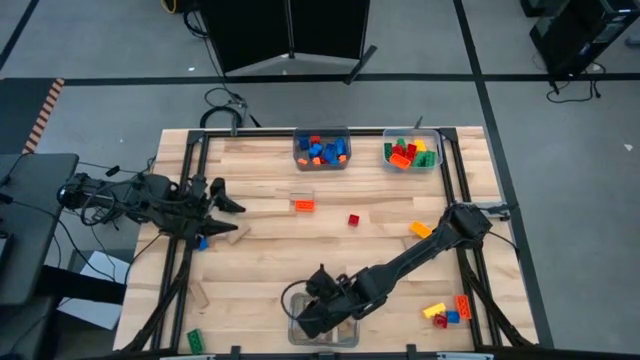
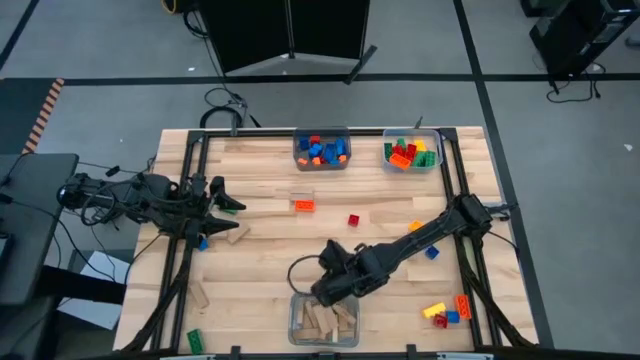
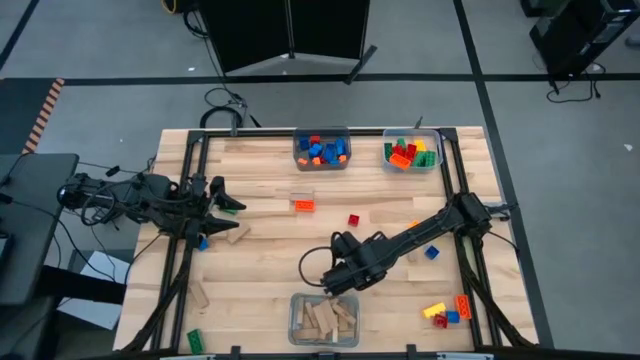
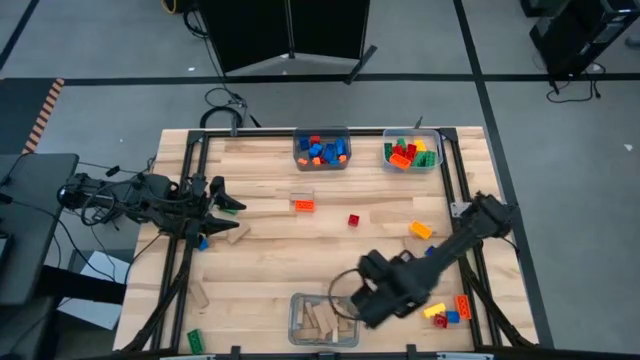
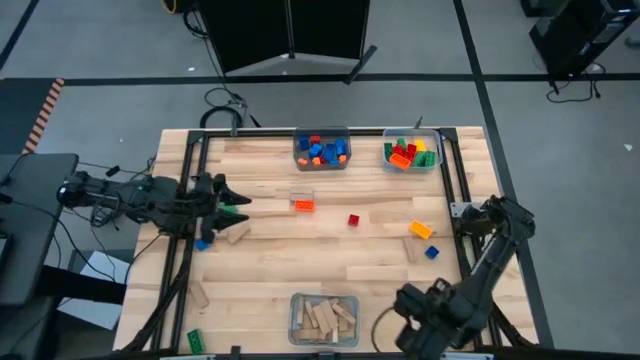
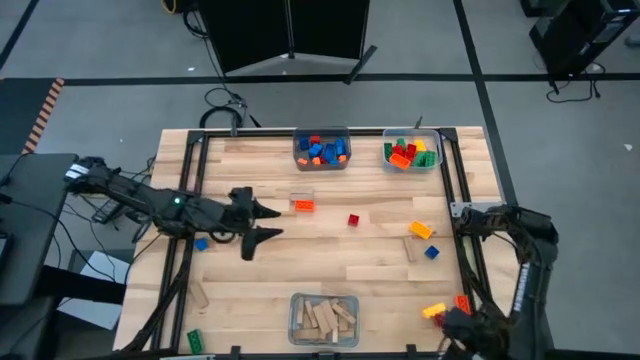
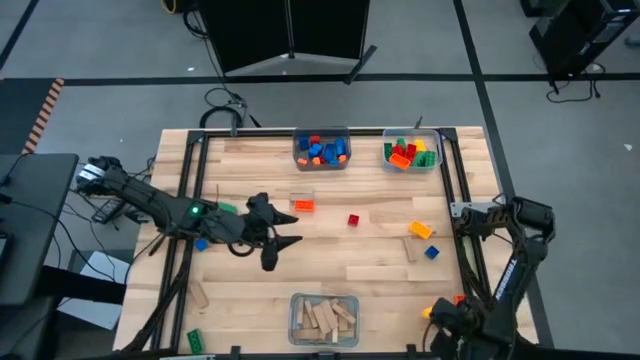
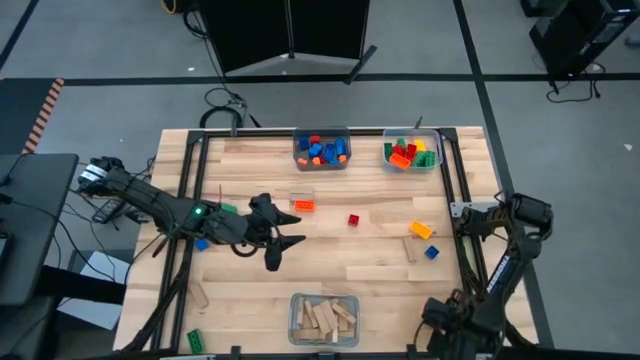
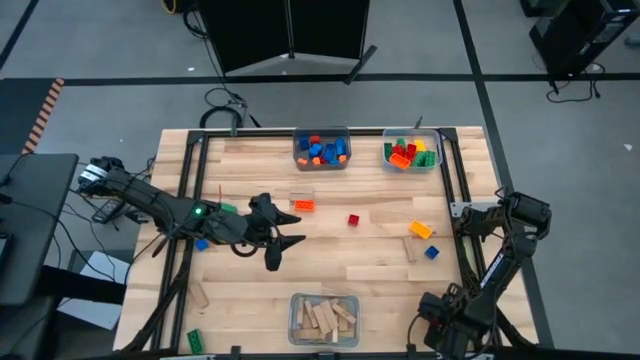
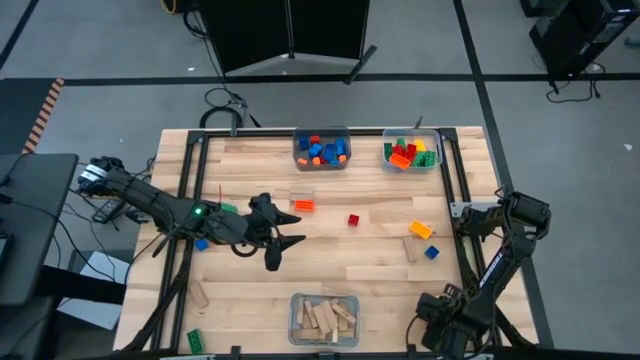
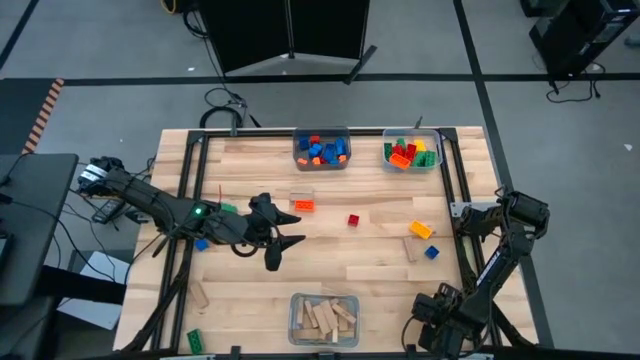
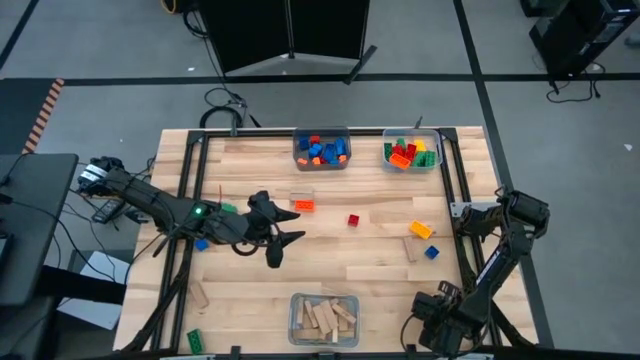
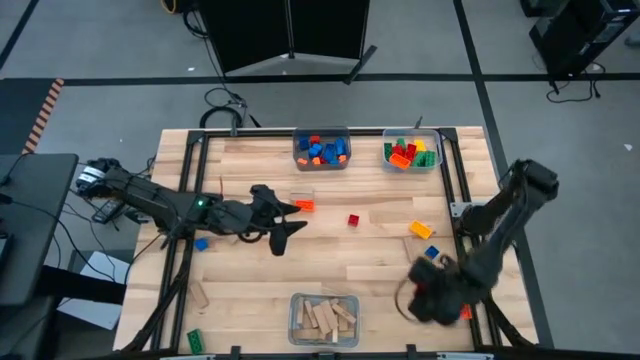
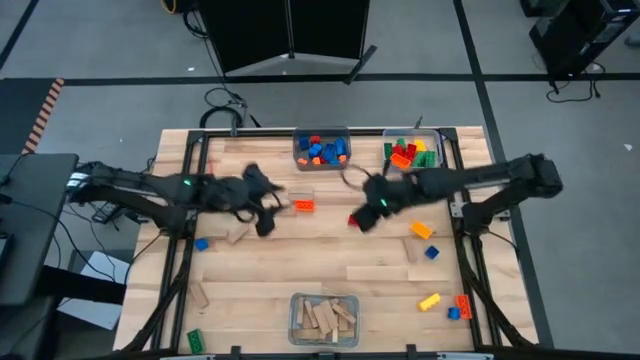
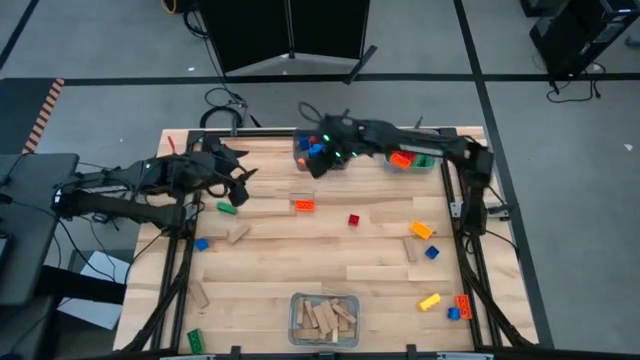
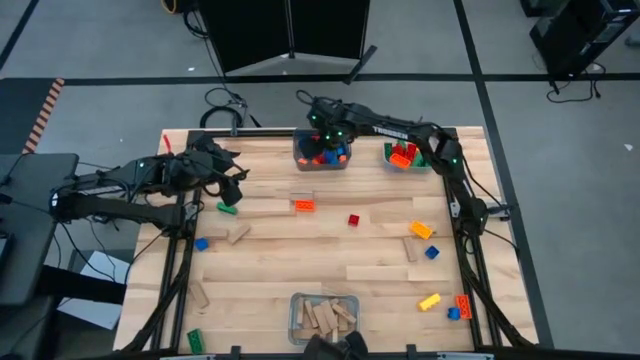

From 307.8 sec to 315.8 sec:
Task: Sort blocks by size
Put the small red game piece into the black bin

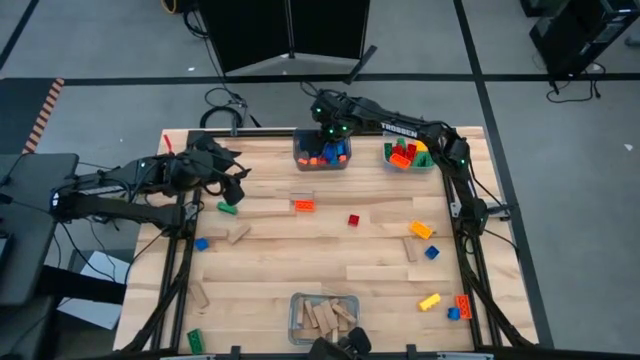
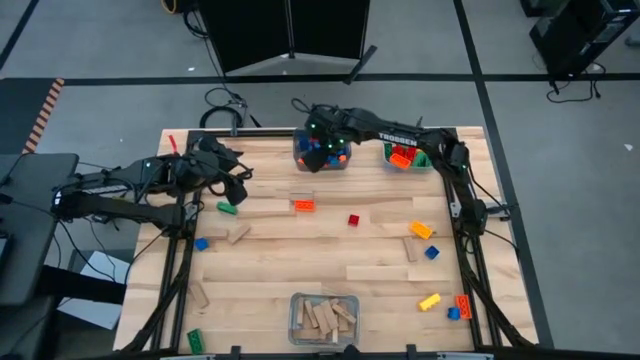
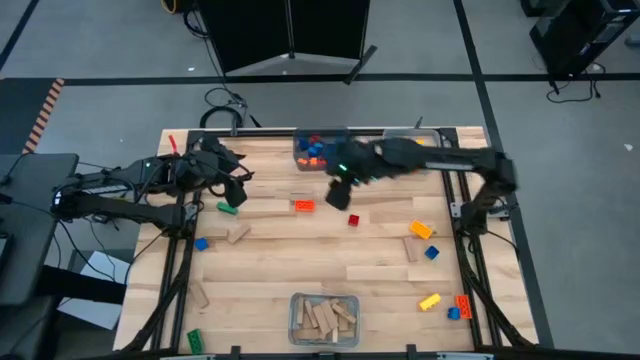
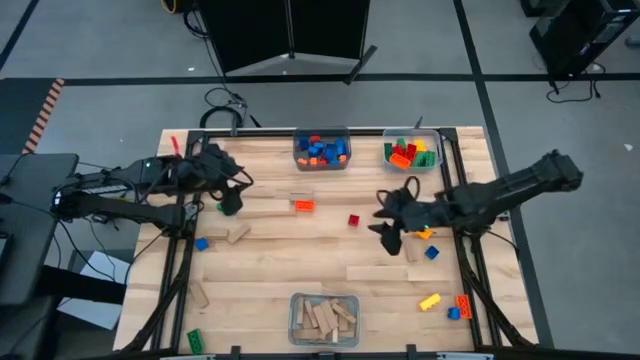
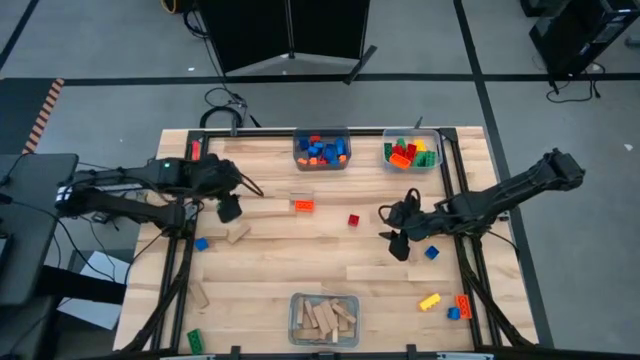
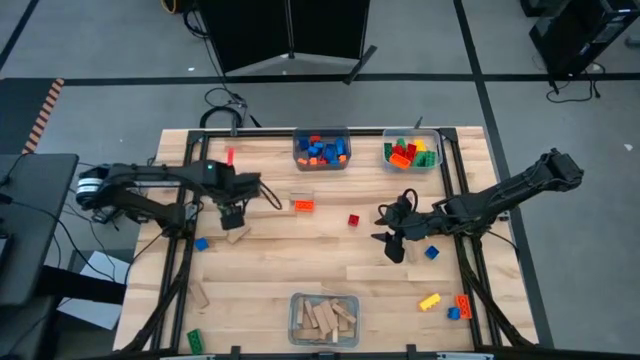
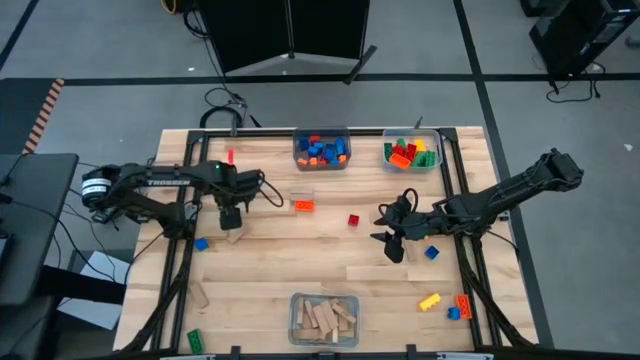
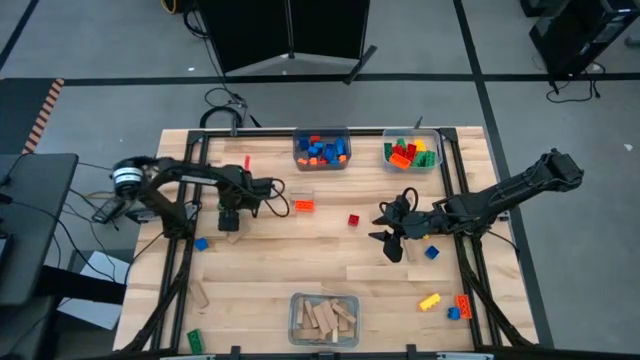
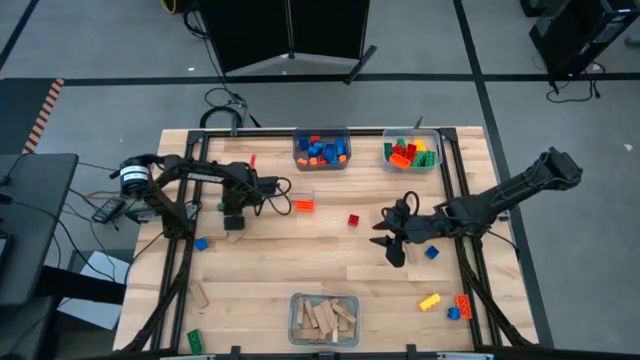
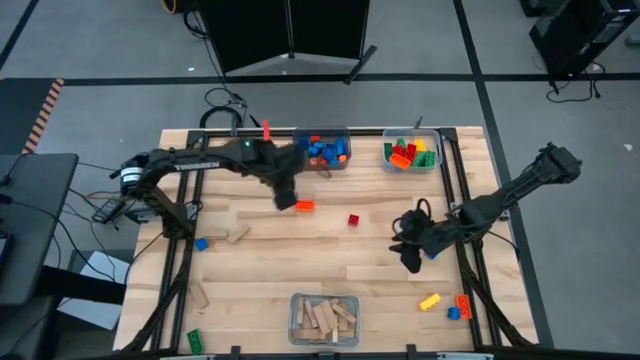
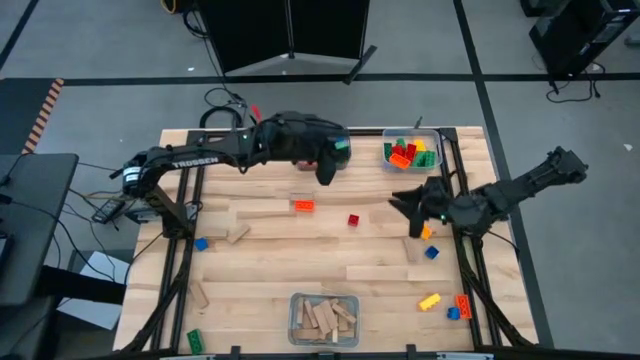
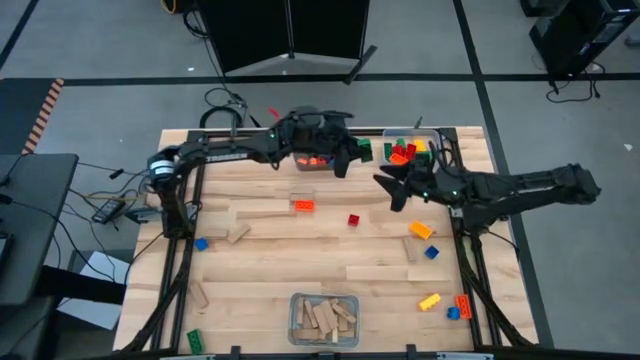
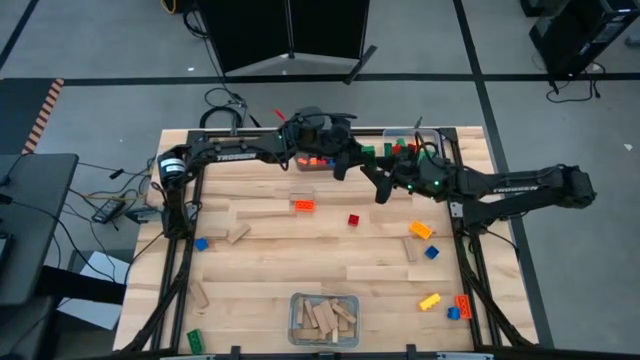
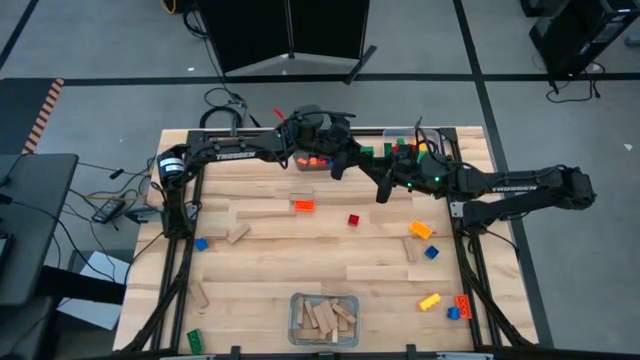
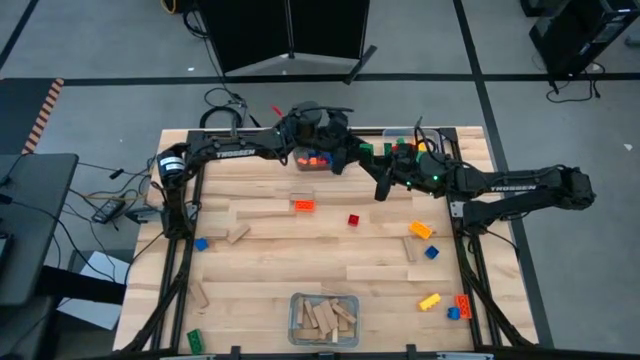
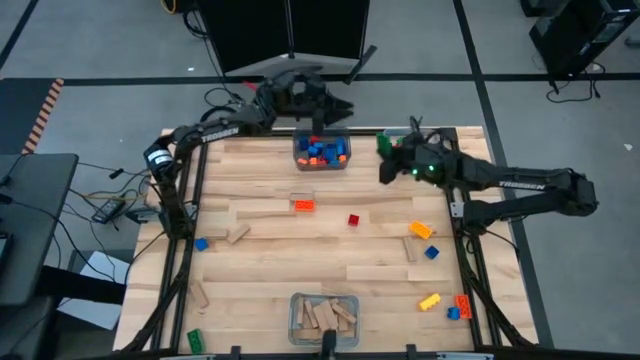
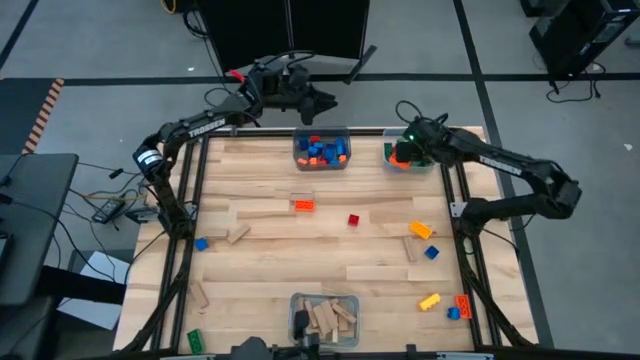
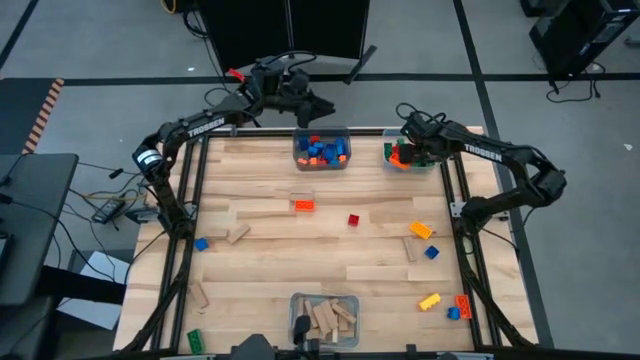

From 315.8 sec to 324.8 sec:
Put the large green game piece into the transparent bin

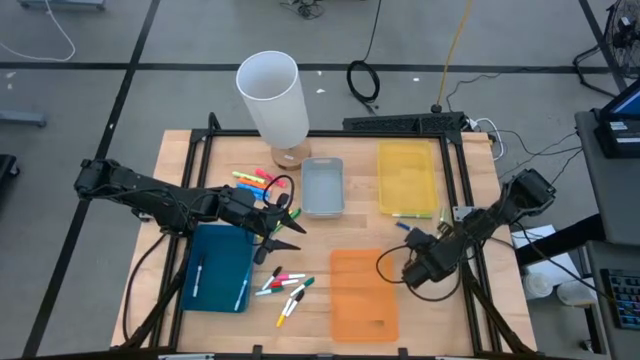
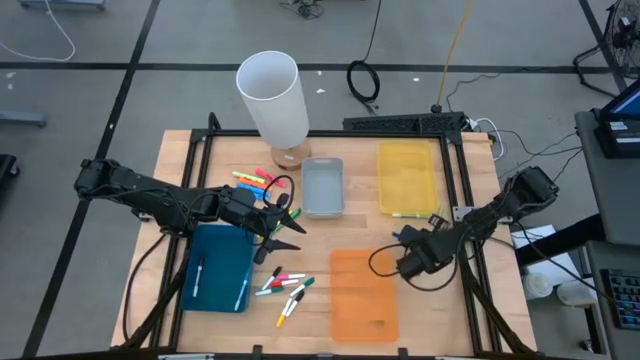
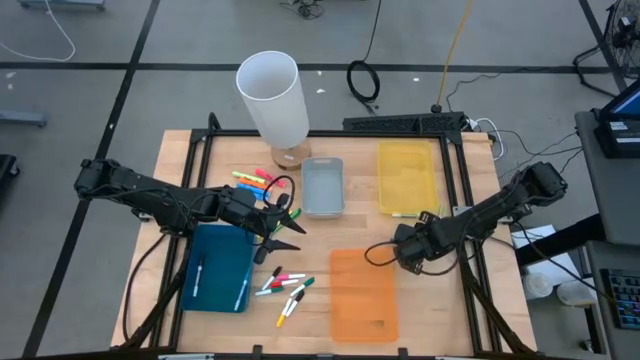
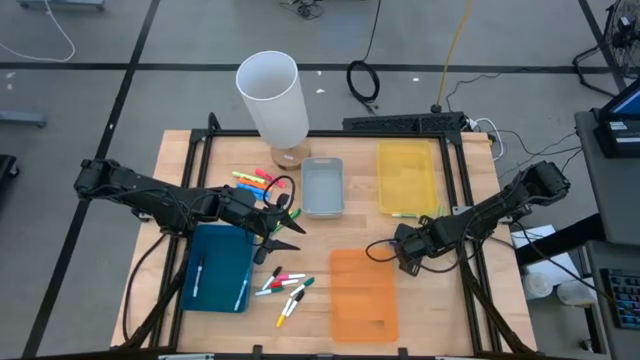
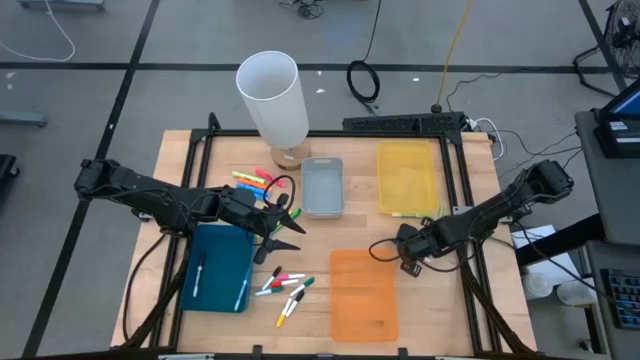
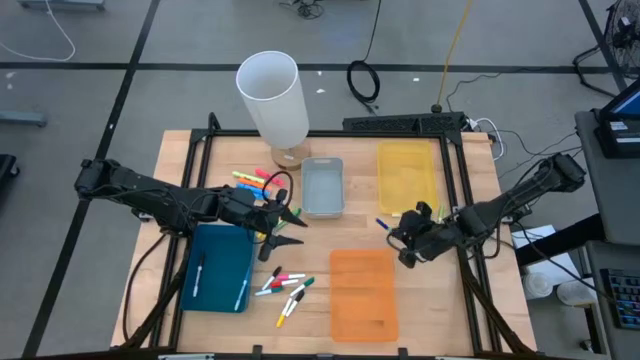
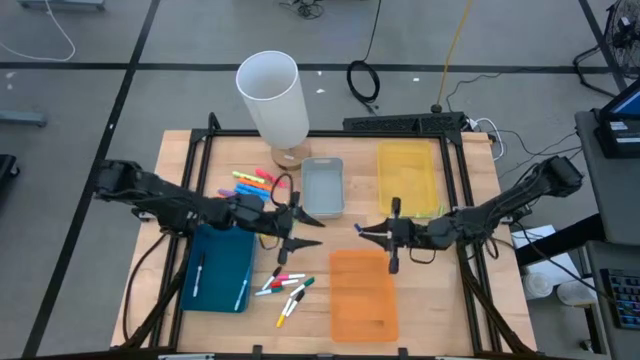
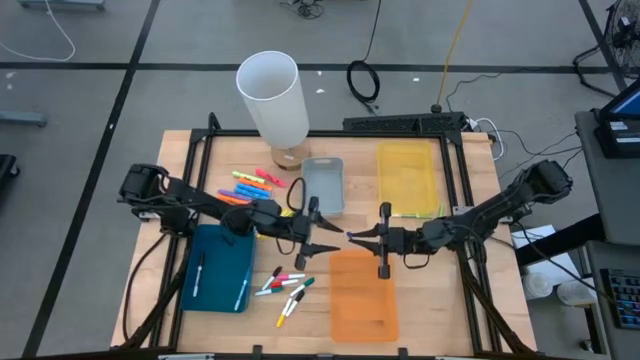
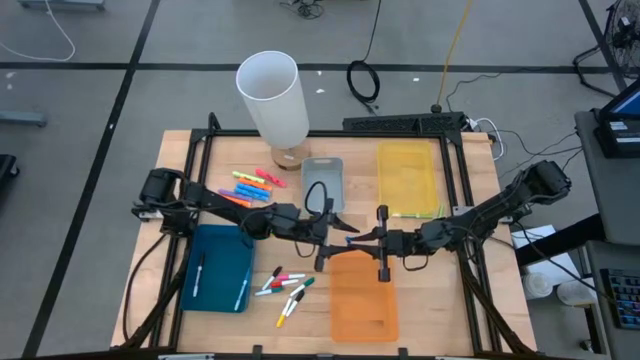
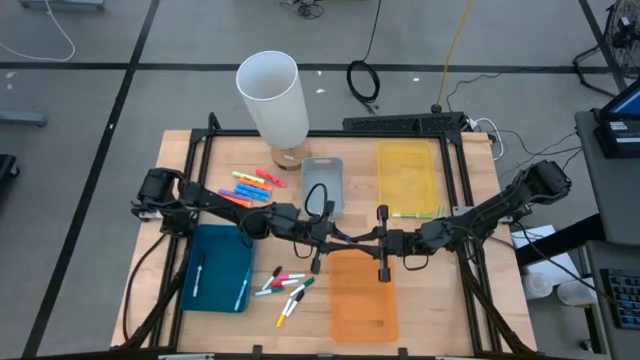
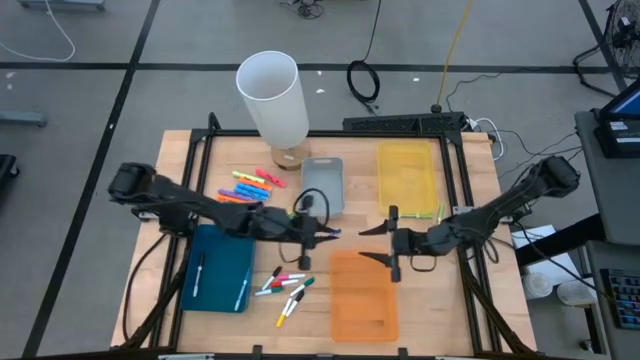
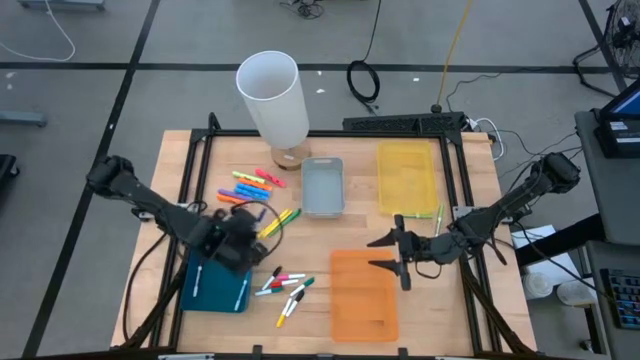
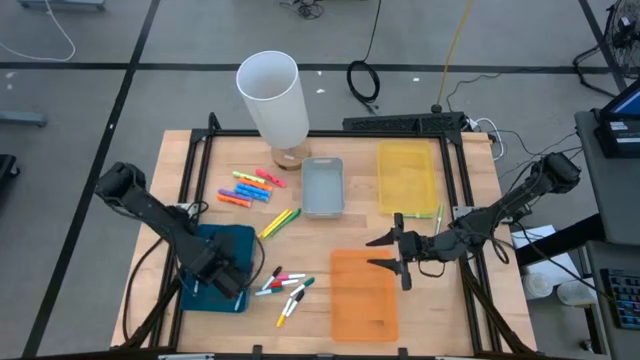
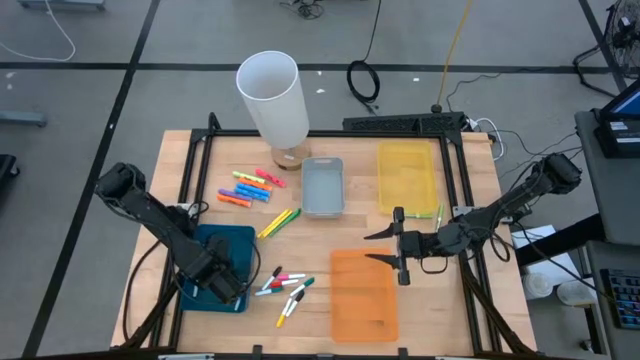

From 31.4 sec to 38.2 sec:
Task: Pick & Place Markers
Put the blue marker pen into the blue bin
